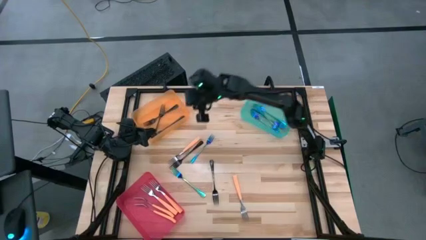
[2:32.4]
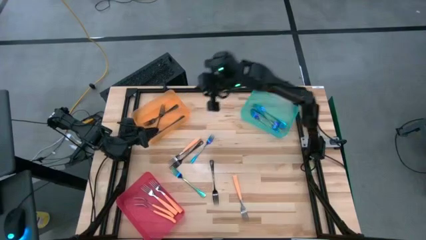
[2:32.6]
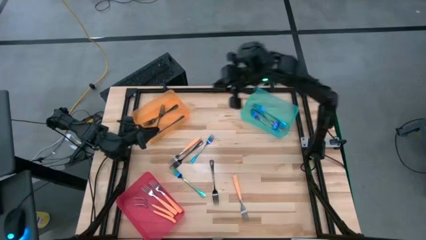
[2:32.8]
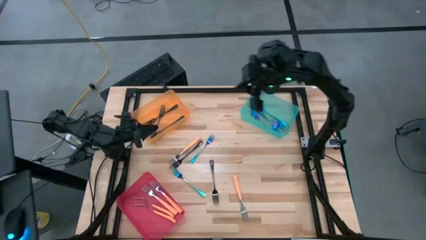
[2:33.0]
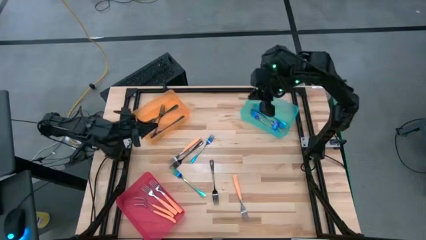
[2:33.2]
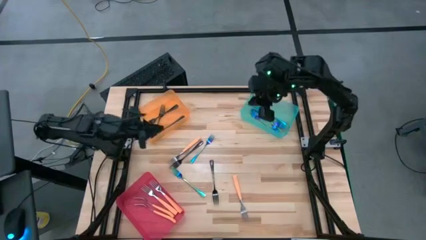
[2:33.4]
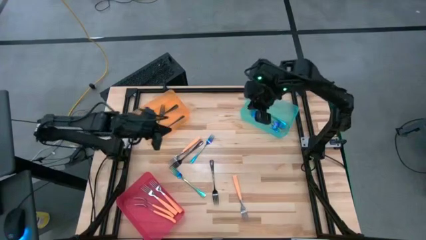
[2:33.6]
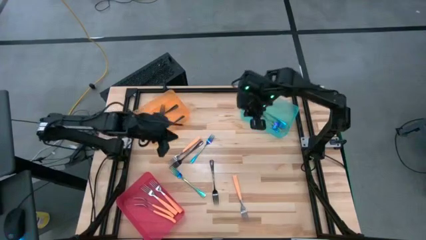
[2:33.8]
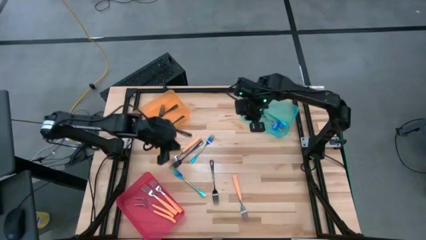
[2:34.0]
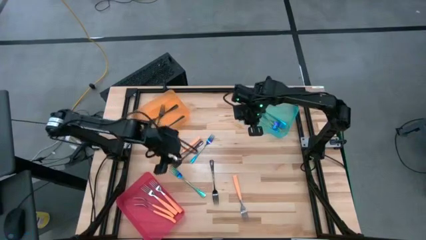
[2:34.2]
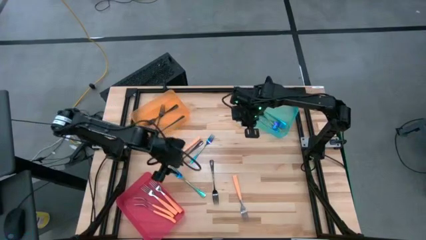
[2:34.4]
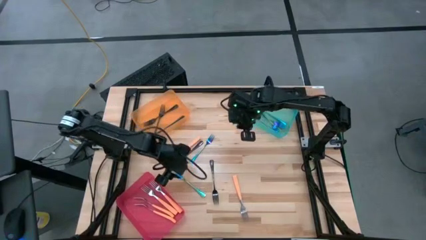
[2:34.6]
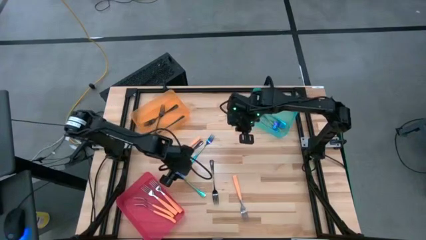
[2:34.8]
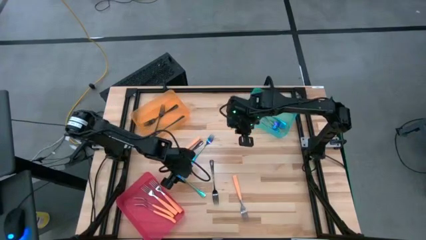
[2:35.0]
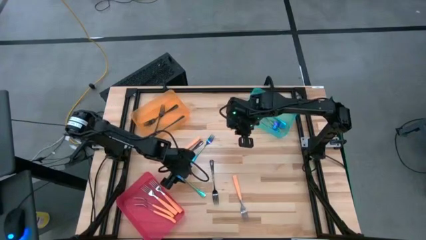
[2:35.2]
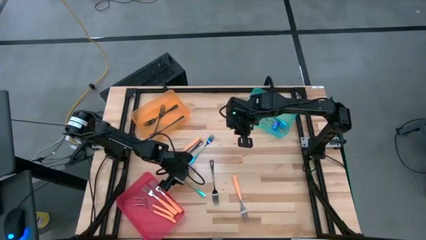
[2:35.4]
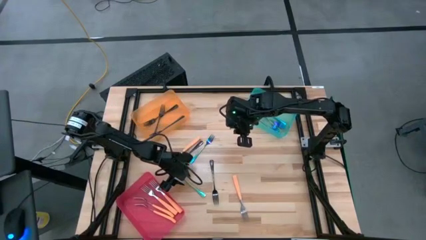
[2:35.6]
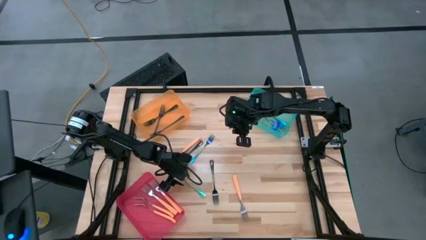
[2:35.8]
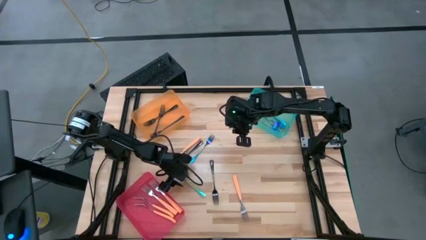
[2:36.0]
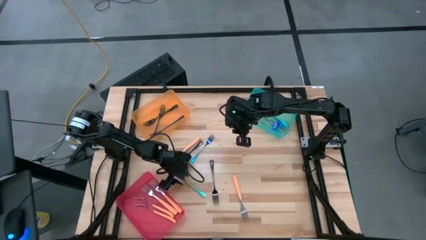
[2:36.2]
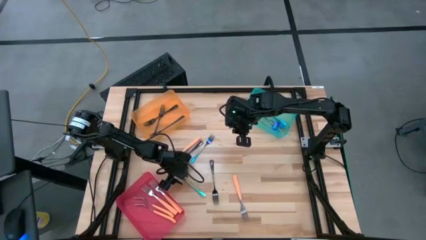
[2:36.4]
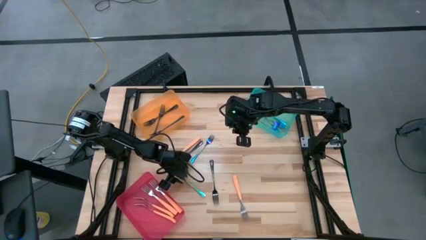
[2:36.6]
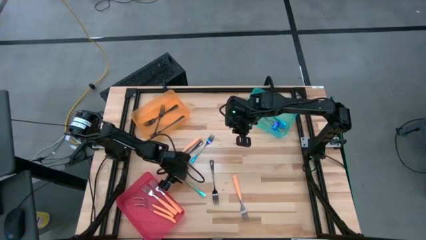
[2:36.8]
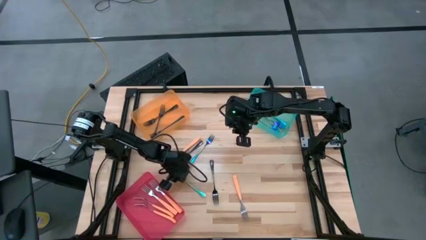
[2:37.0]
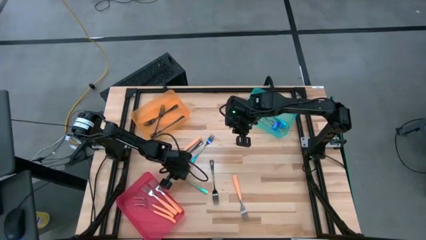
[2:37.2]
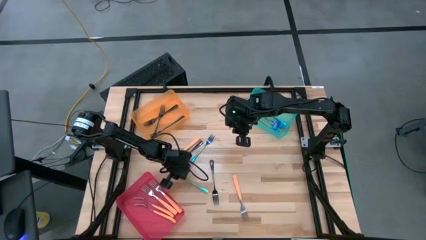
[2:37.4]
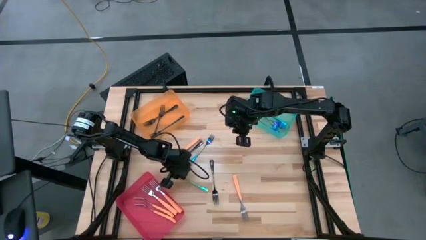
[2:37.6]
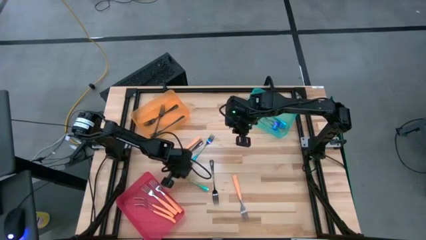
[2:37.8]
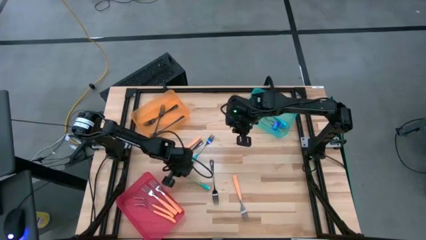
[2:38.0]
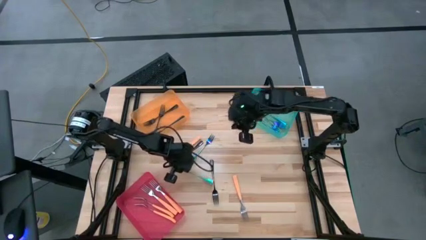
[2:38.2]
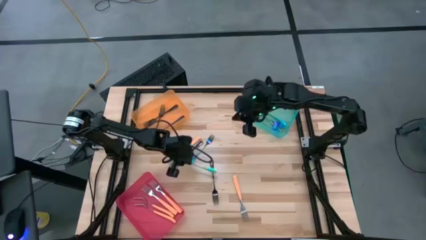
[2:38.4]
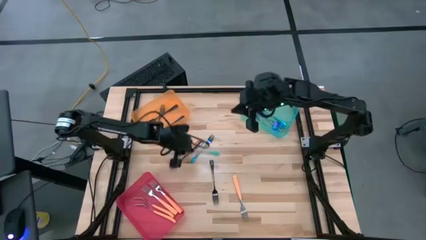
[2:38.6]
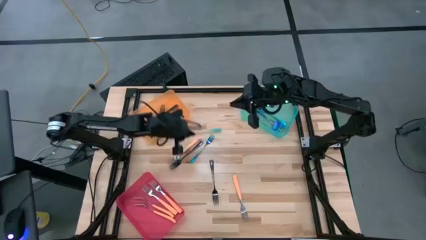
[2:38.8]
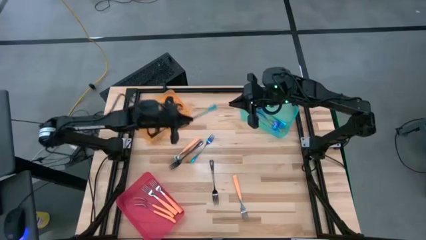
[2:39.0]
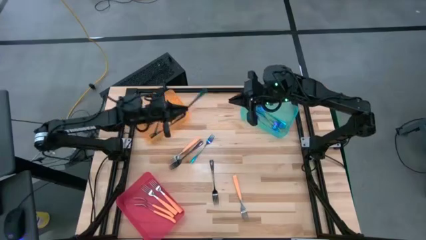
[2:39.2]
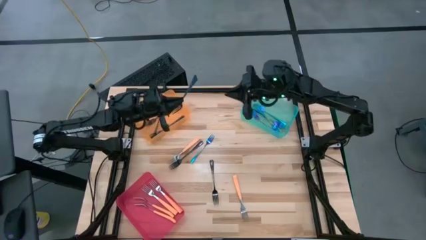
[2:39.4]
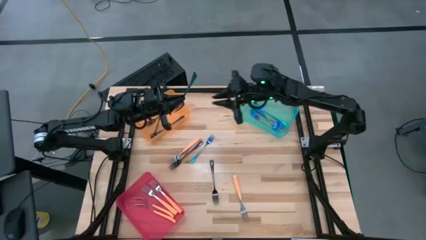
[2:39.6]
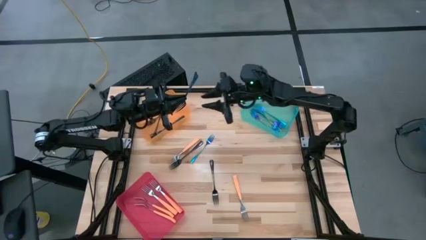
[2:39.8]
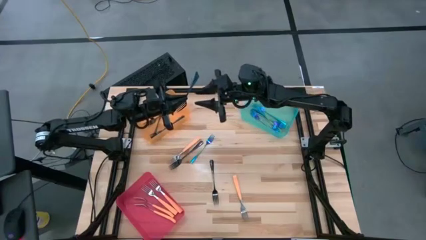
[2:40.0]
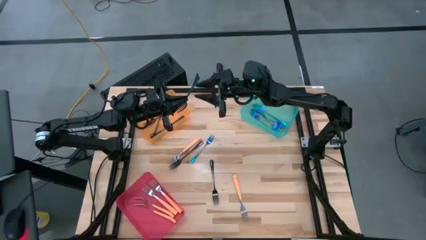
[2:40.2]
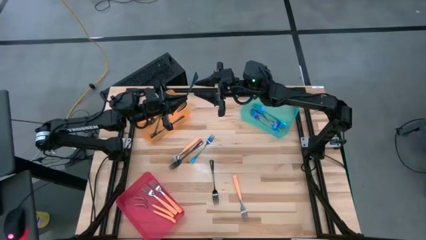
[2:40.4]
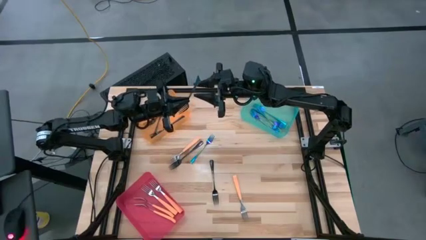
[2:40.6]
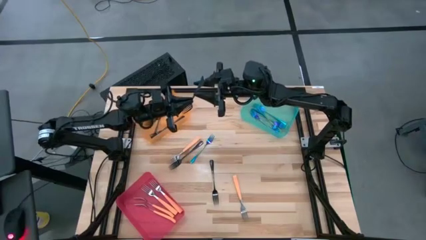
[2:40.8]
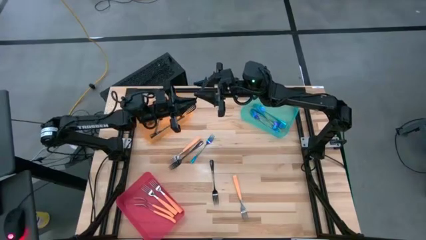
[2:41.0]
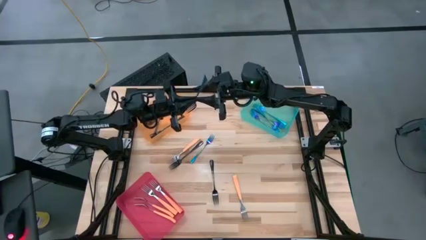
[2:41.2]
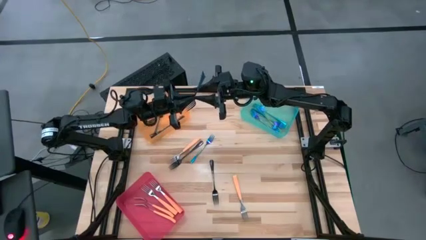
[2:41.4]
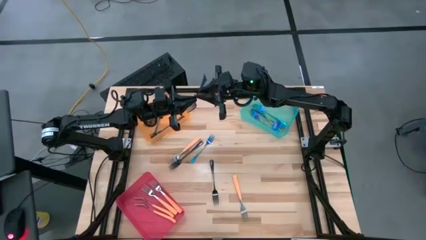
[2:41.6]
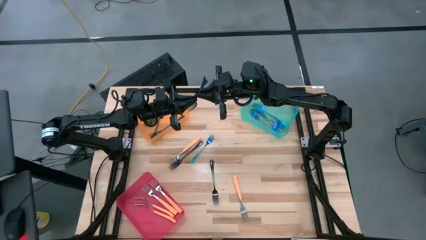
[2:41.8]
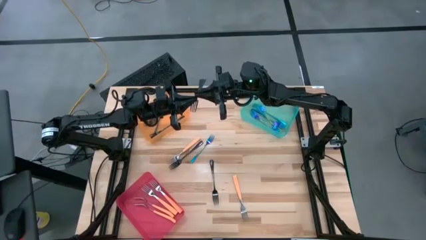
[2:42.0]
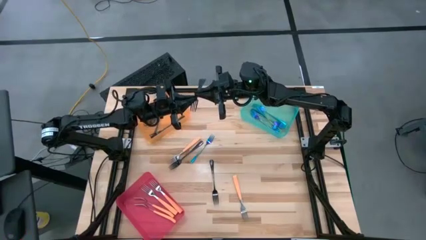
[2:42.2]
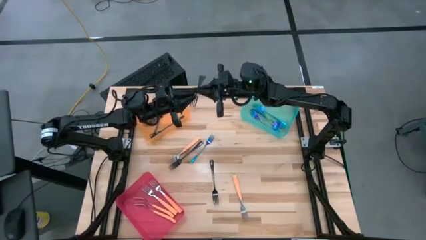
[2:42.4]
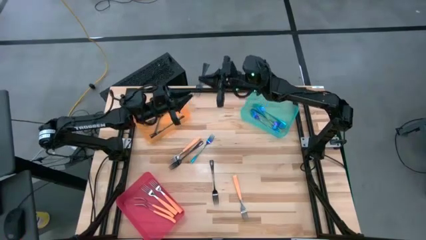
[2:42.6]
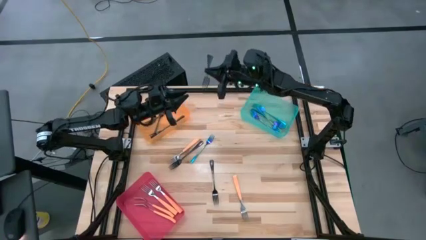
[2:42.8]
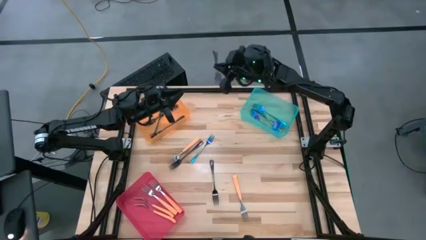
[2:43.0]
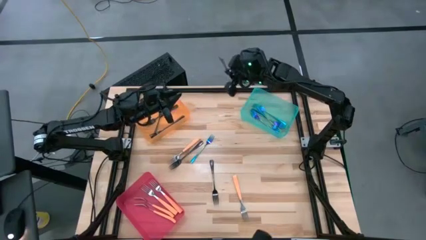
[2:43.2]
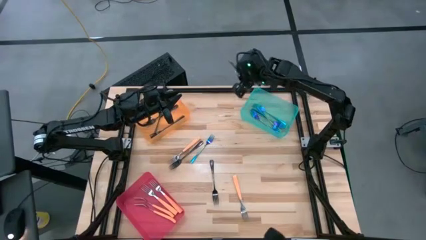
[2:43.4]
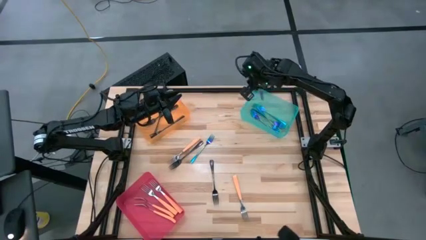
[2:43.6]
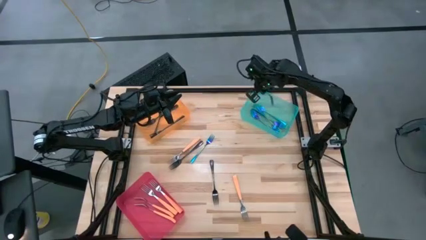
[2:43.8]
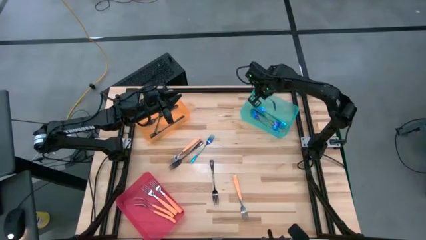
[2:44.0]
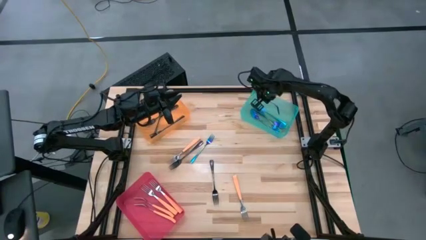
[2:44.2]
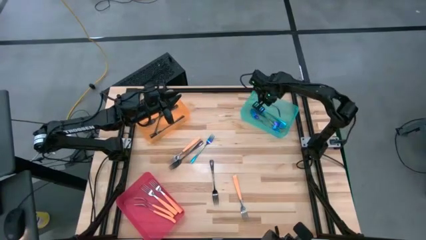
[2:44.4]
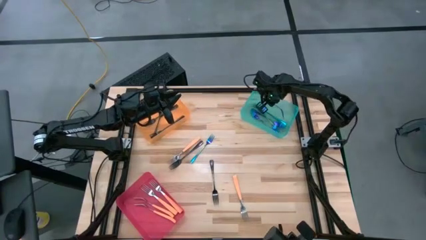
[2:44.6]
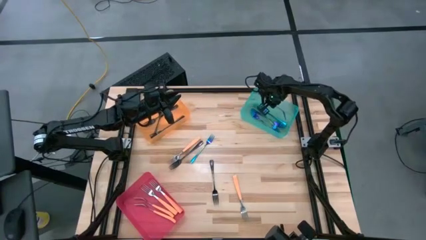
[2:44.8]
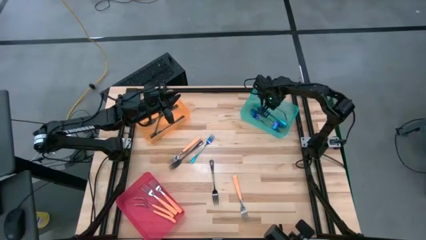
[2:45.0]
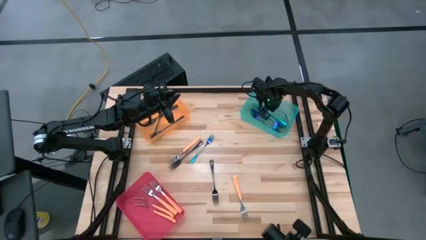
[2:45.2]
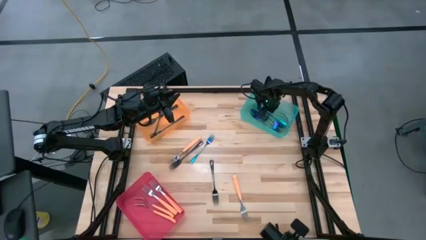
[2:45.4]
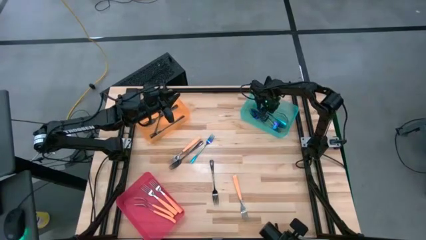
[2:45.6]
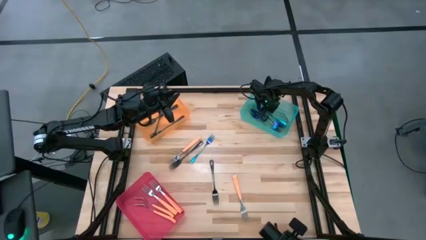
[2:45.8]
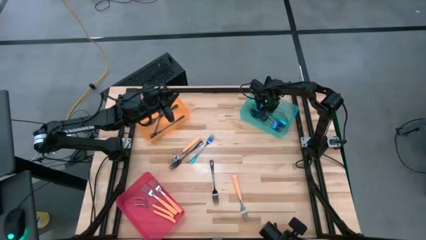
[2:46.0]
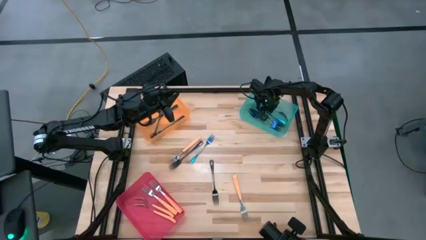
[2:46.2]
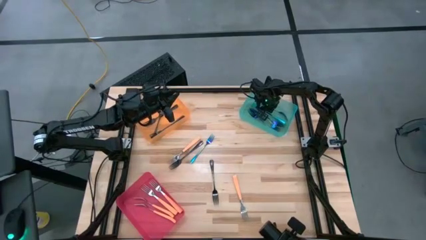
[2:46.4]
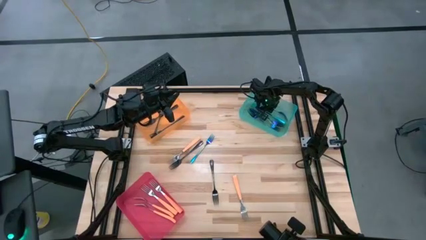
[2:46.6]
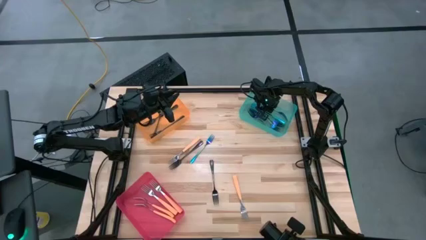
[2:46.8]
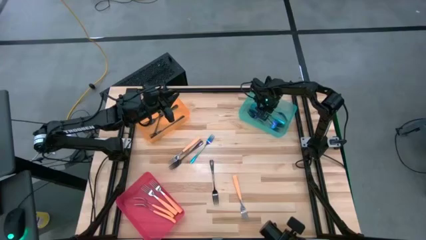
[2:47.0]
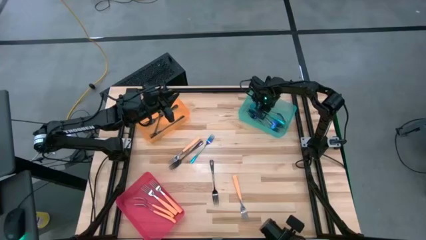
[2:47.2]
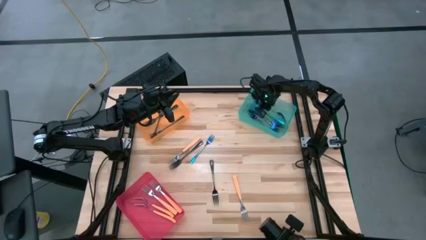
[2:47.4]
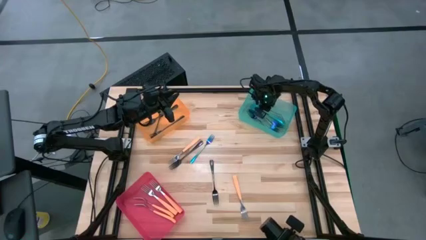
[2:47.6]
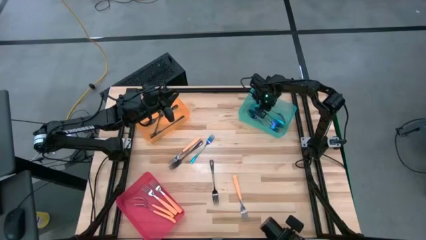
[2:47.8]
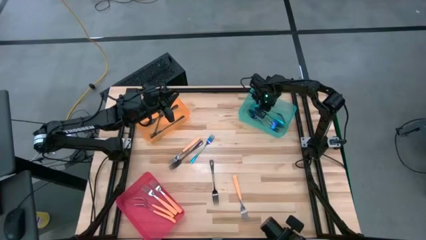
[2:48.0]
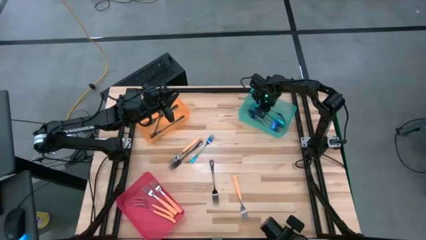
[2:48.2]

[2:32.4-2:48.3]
Task: Sort silverware by color (type)
Put the iridescent fork into the green bin
